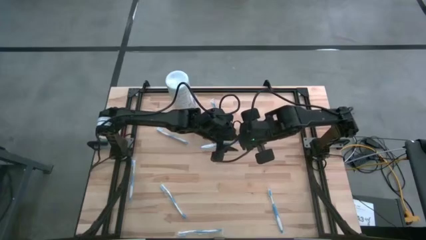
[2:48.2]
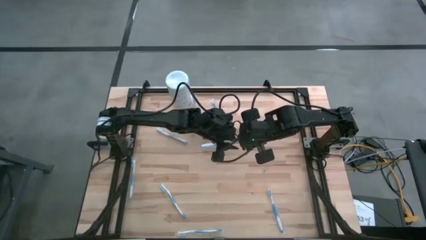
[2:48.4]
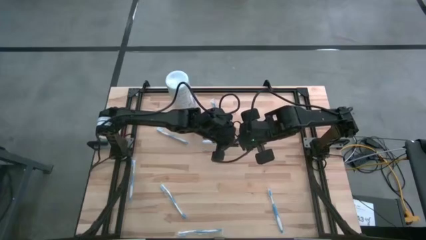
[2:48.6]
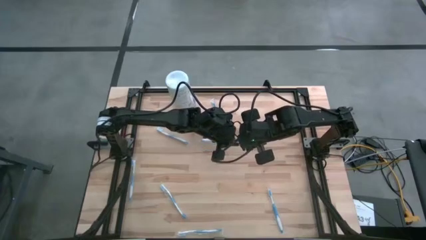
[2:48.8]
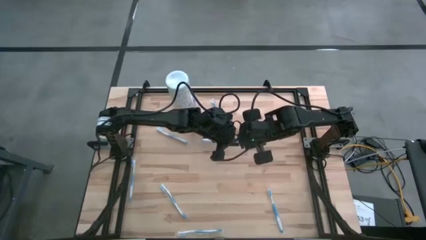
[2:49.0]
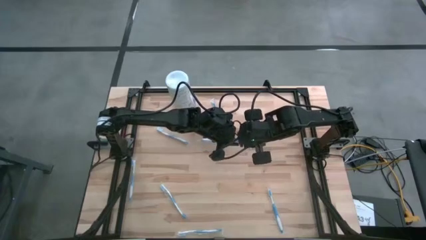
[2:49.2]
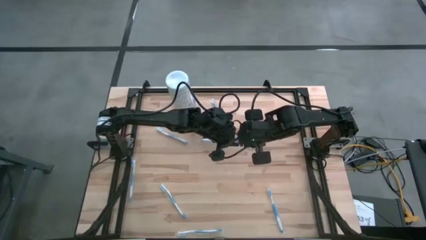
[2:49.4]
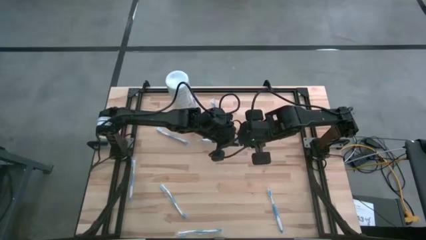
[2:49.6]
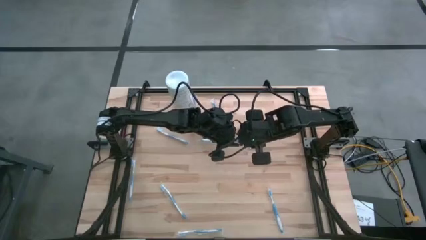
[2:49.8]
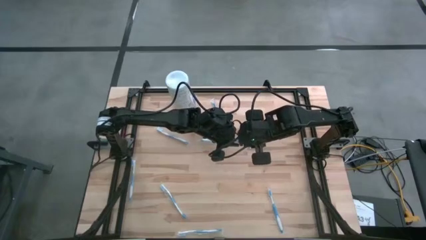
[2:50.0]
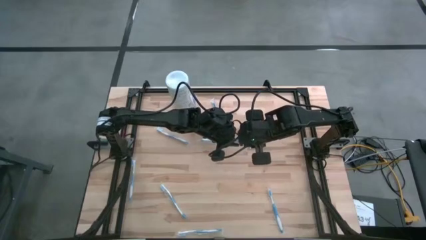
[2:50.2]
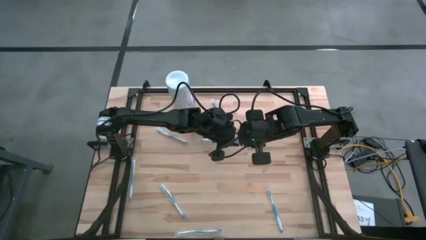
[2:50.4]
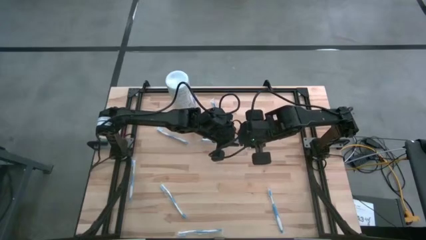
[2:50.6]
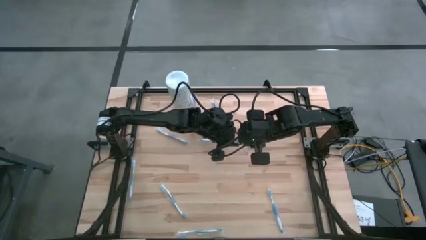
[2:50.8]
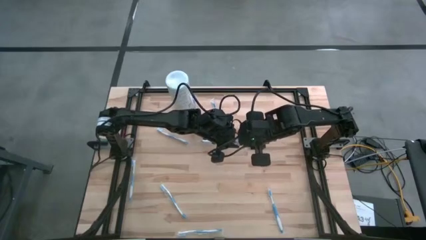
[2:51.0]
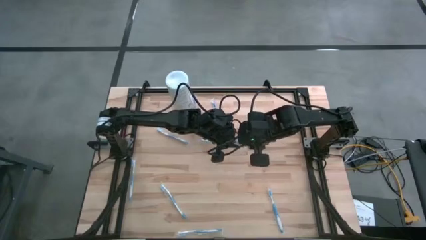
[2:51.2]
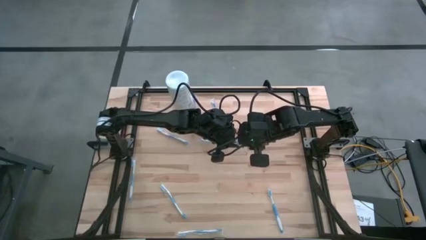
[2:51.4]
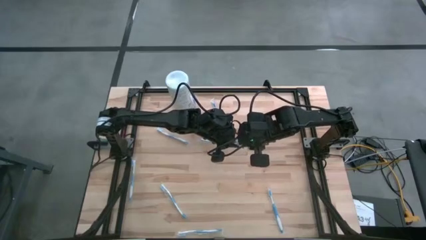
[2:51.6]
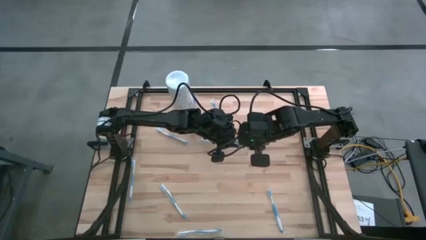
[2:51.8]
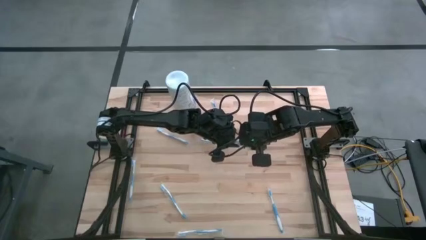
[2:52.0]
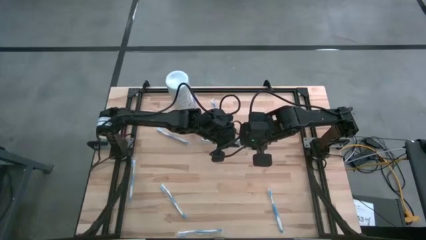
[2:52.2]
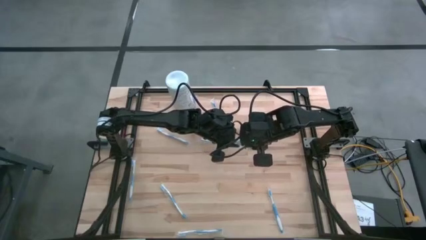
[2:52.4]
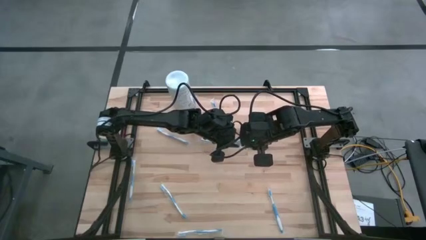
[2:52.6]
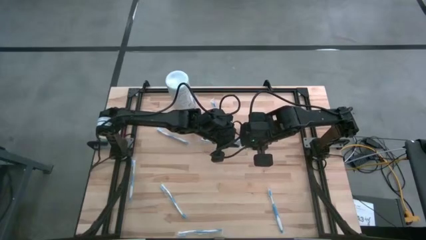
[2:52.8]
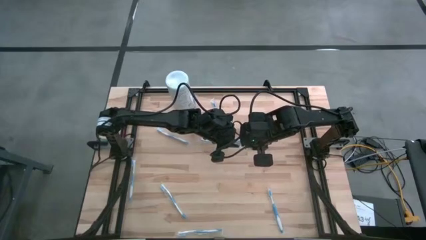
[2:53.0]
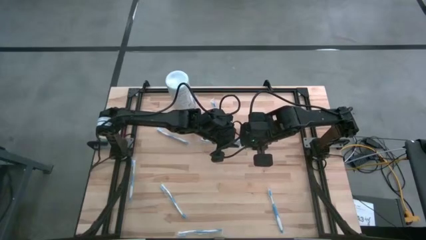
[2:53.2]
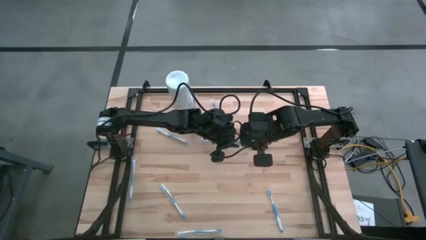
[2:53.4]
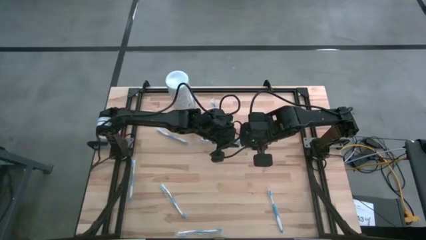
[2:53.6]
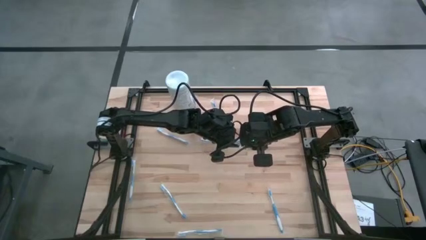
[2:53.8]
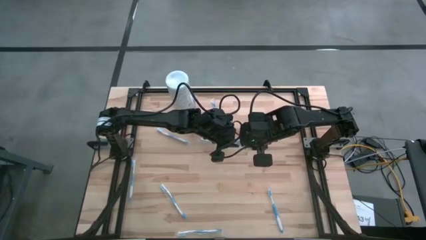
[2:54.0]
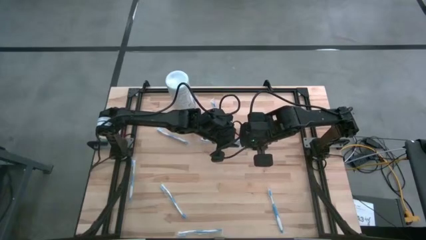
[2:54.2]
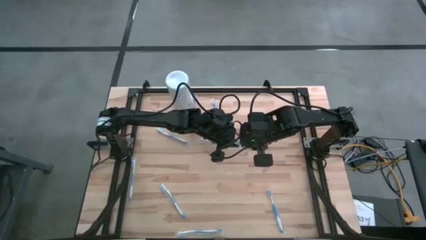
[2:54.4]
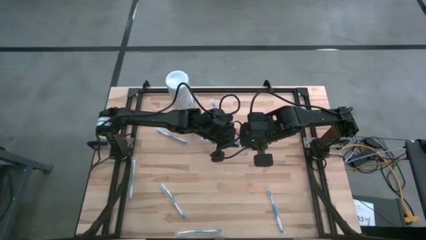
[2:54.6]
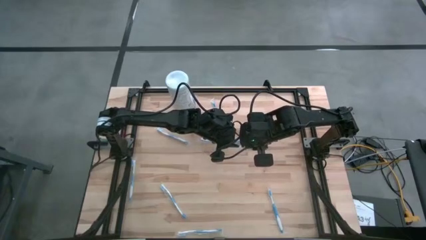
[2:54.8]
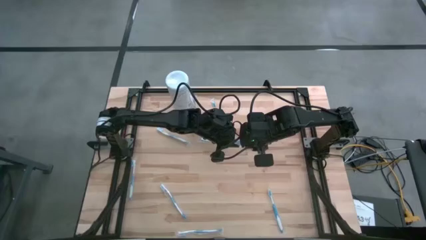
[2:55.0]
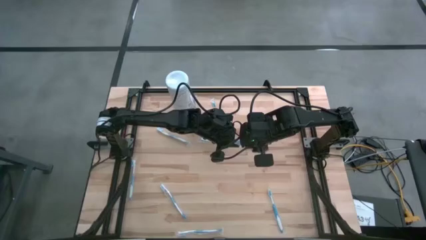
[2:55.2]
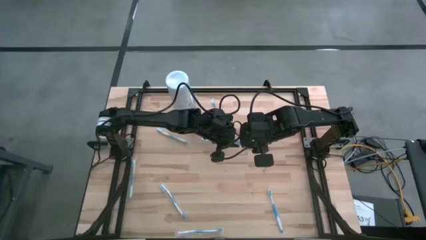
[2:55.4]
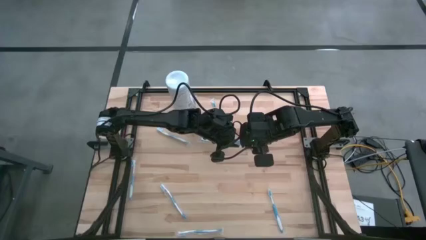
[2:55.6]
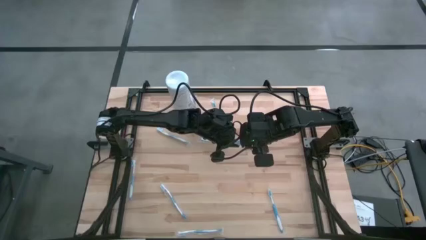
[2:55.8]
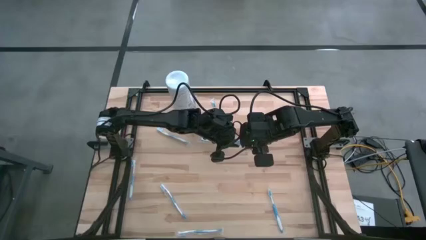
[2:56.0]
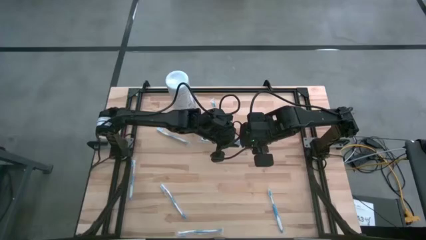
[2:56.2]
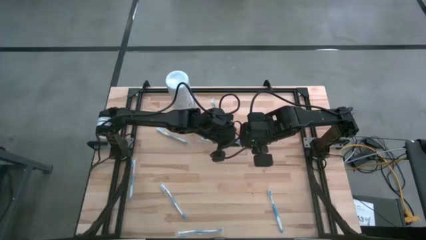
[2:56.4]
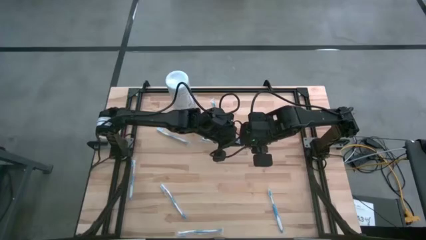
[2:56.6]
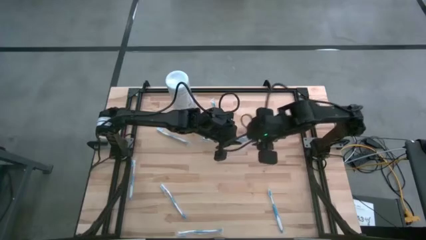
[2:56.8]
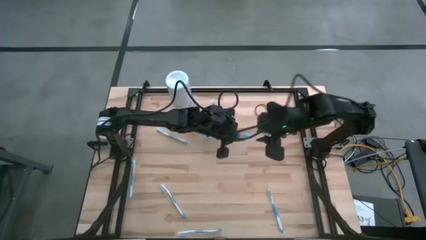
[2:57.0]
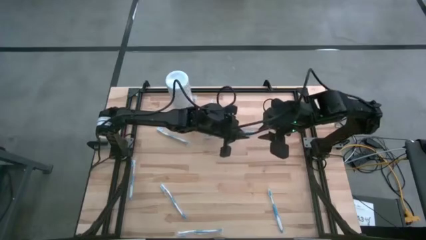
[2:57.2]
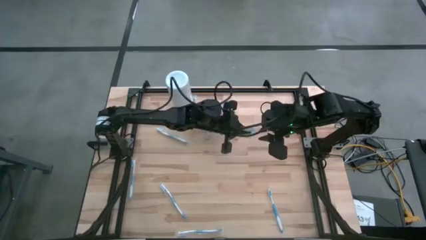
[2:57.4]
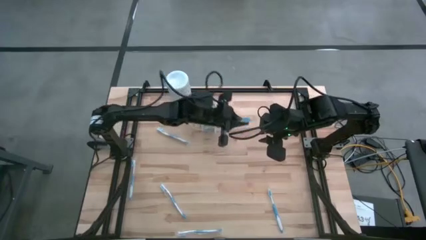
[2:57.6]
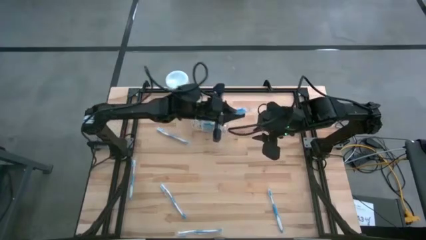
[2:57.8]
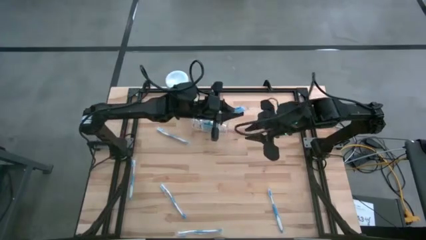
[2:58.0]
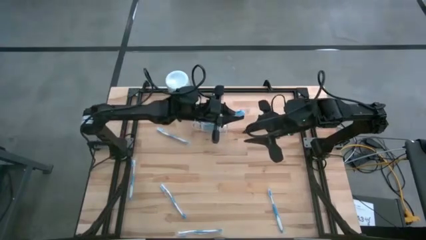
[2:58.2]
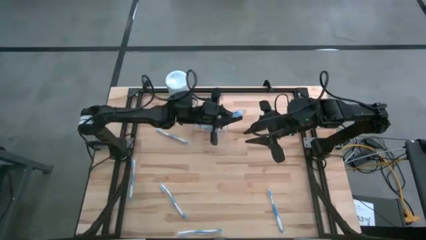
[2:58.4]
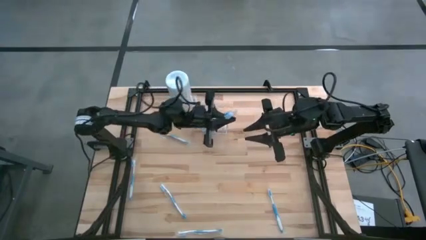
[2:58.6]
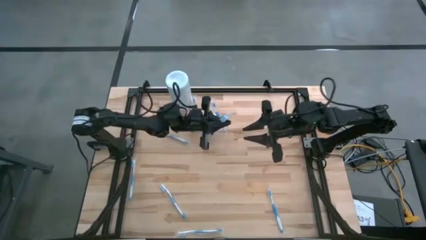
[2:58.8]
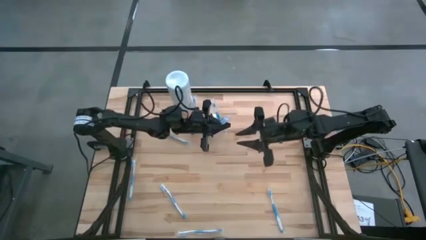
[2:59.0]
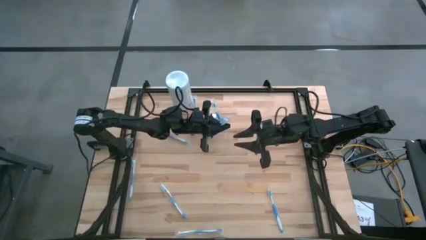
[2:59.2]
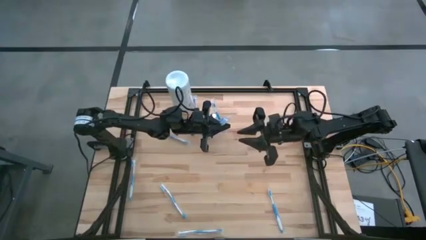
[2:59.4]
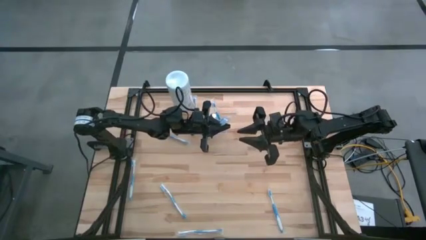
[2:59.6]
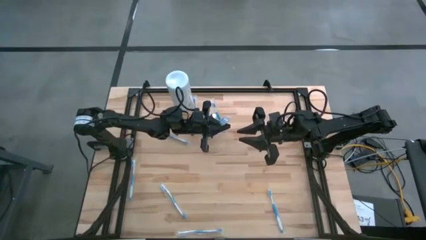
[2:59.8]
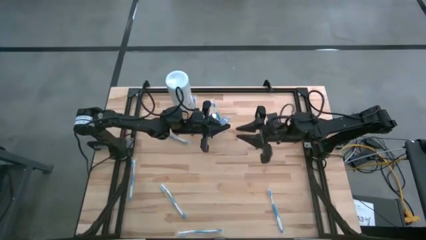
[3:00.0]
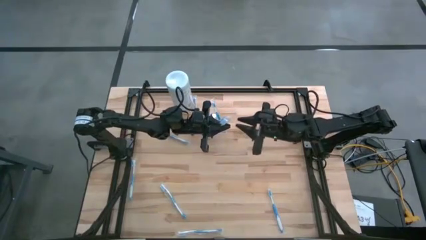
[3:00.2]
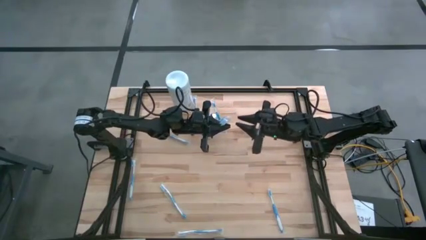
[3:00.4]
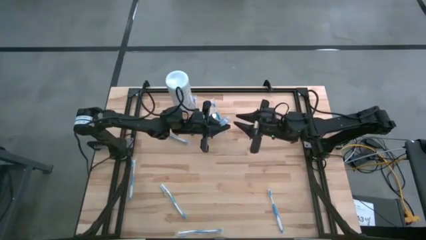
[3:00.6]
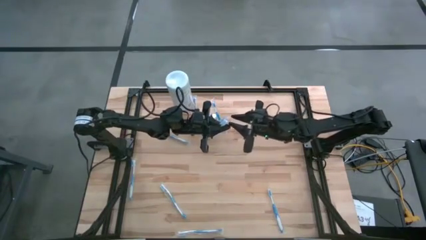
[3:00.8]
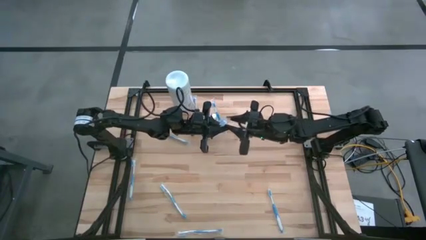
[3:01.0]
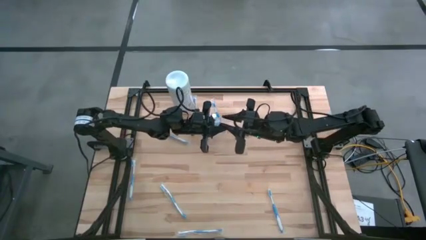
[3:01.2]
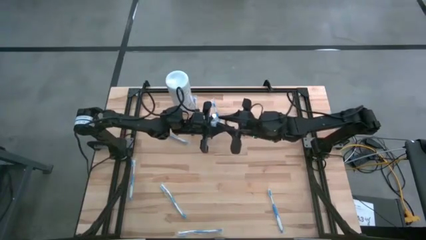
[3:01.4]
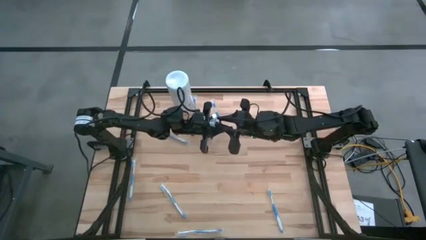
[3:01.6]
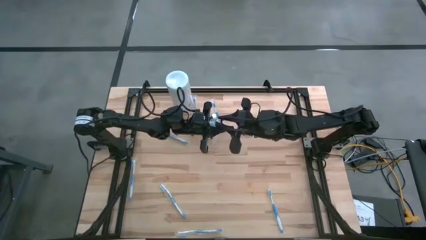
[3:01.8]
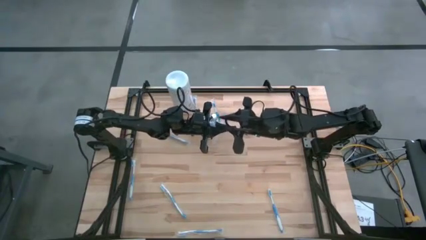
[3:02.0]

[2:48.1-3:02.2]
Task: Pick & Place toothbrushing station
Put the blue toothbrush into the right of the transparent organizer

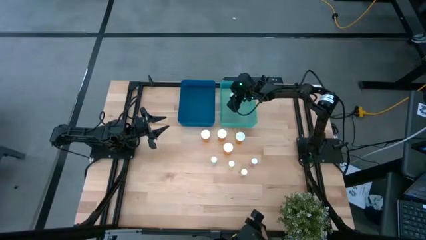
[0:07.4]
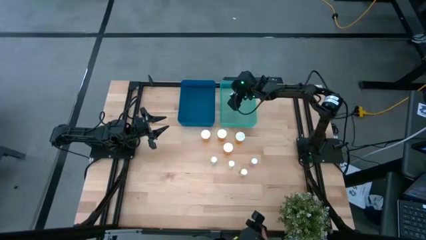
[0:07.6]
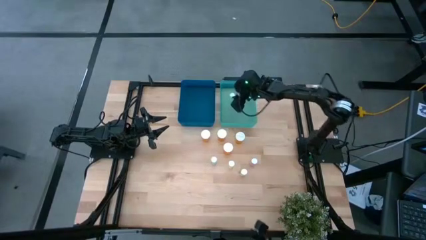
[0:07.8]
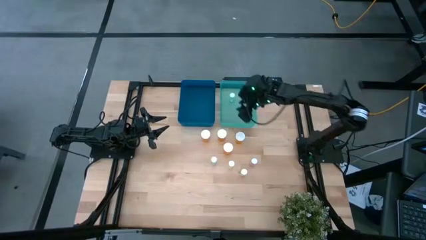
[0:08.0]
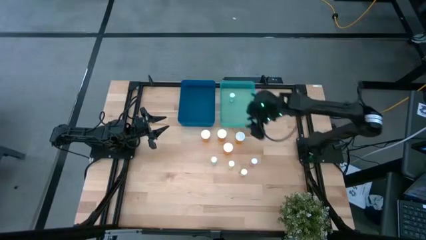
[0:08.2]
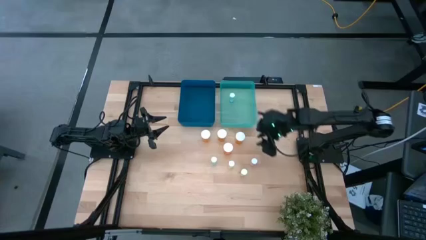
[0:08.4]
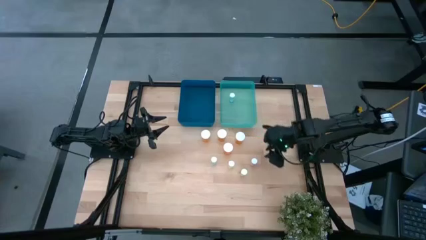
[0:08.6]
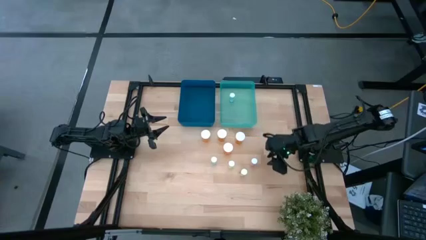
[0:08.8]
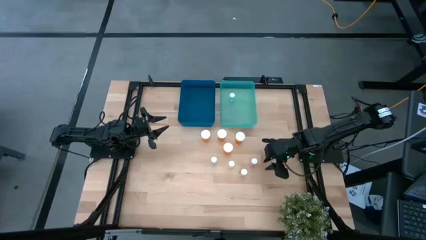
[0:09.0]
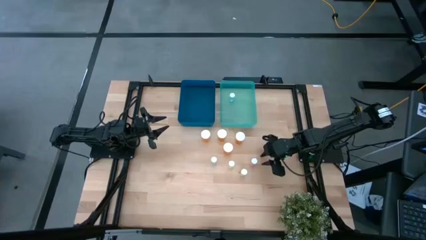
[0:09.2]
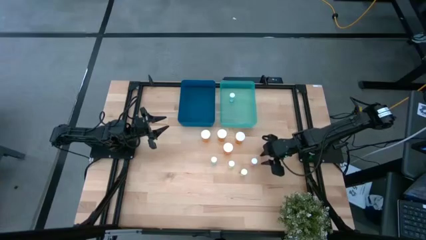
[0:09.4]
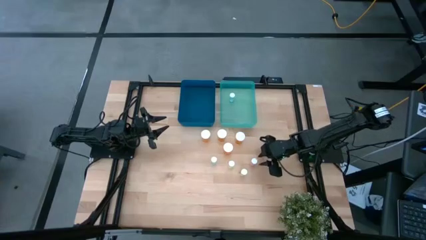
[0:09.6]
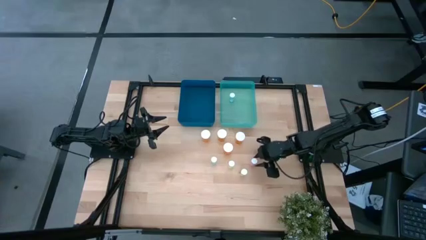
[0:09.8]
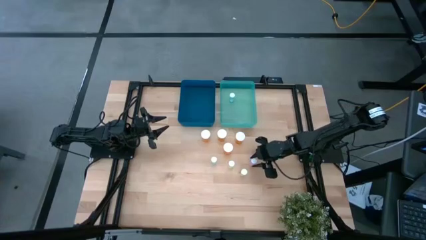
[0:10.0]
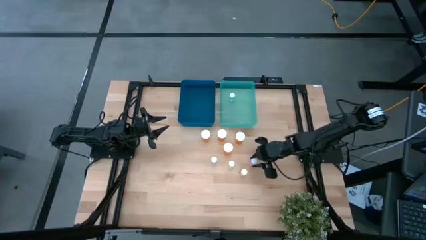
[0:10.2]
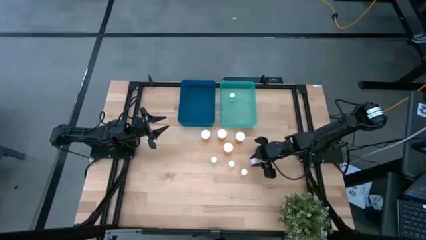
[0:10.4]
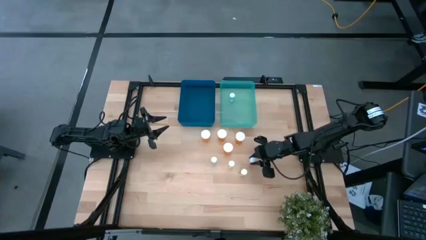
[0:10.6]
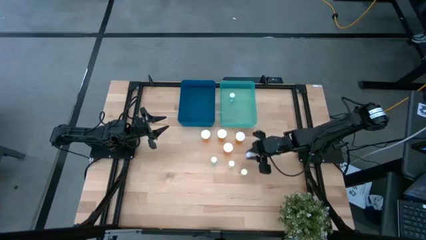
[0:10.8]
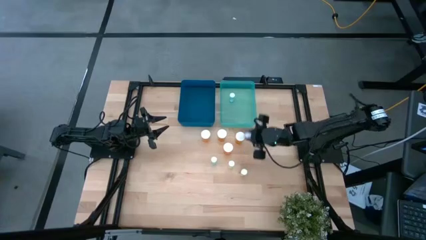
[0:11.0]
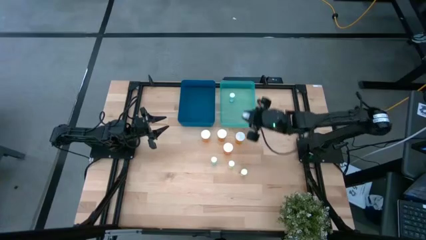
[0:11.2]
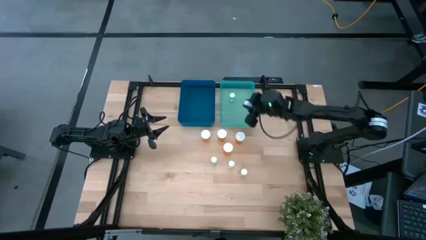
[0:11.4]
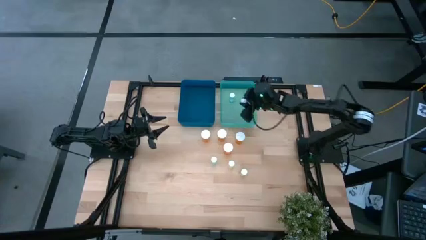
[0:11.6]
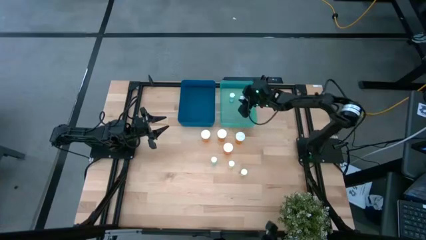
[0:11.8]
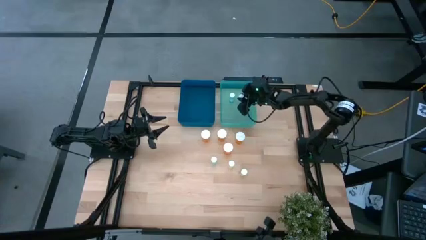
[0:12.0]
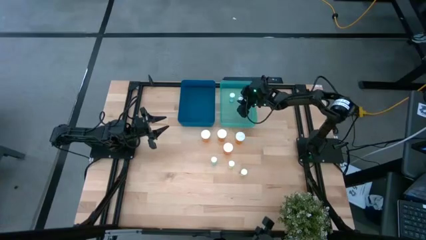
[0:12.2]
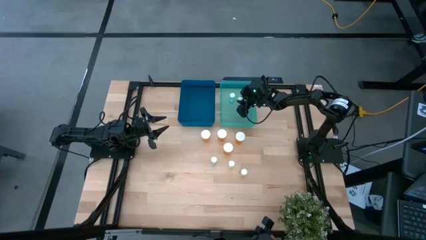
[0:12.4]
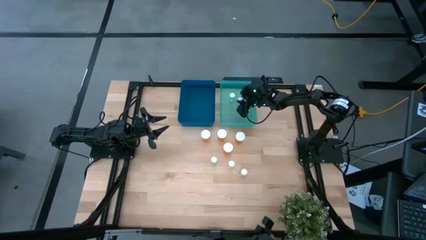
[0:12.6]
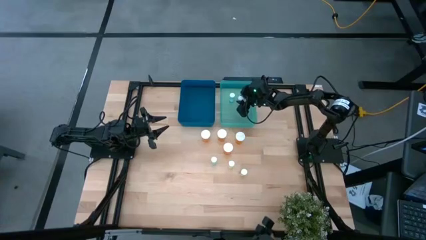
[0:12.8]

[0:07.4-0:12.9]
Task: Pick and place medicine bottles into bin by pill shape (circle, oval)
Put the pink tablet bottle into the light blue bin
